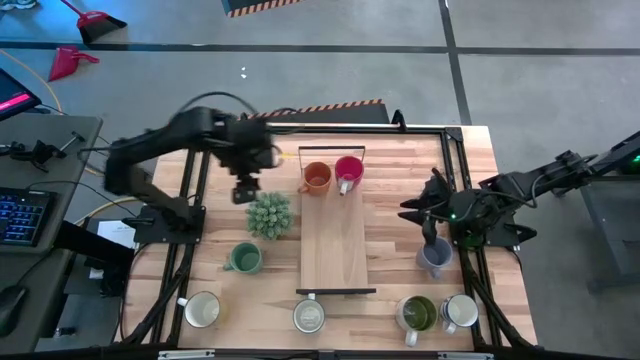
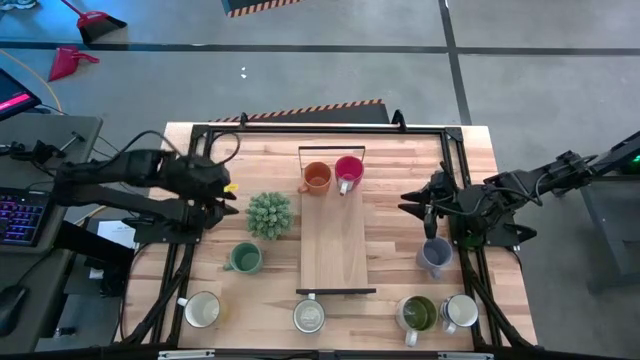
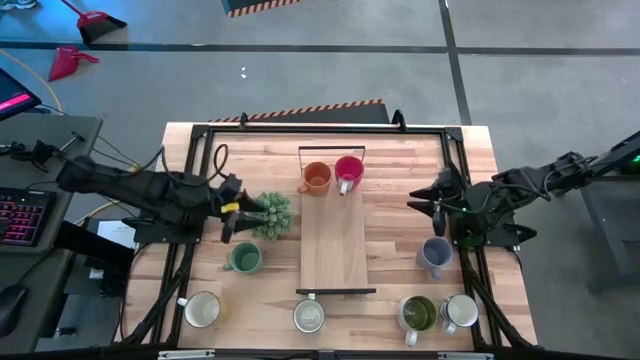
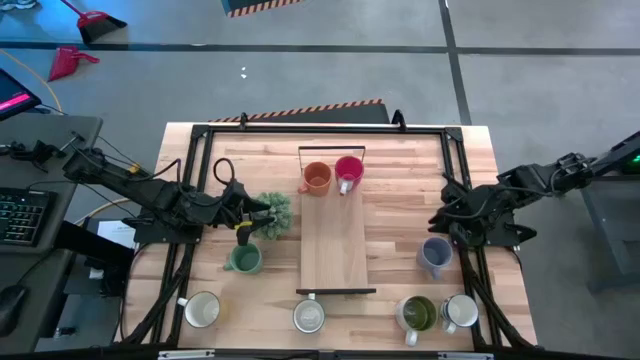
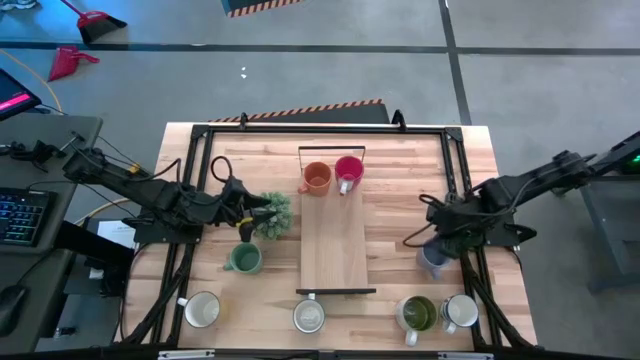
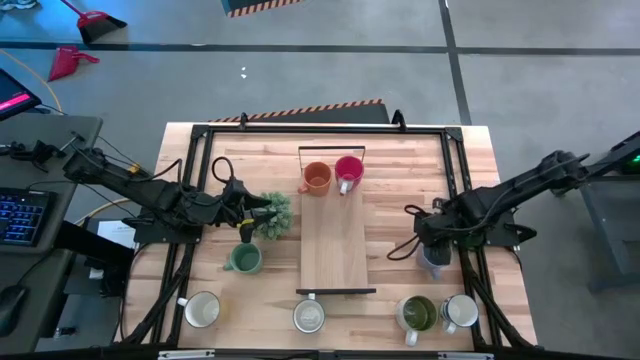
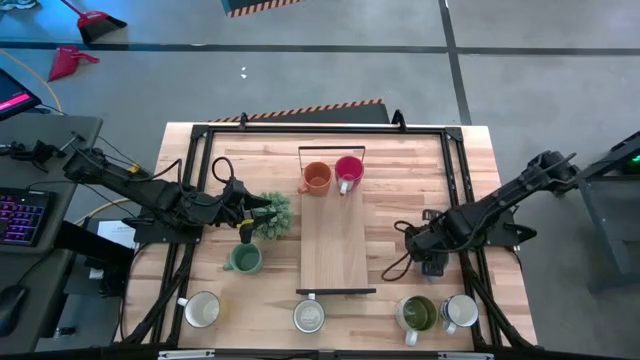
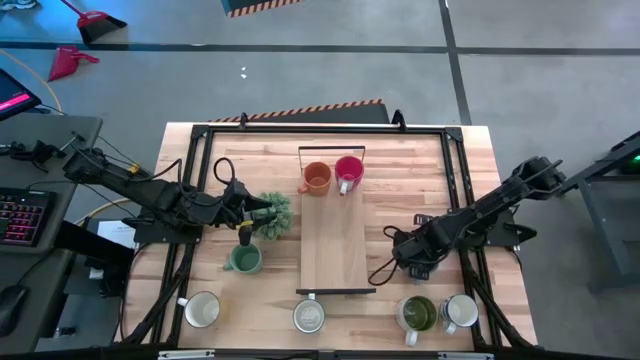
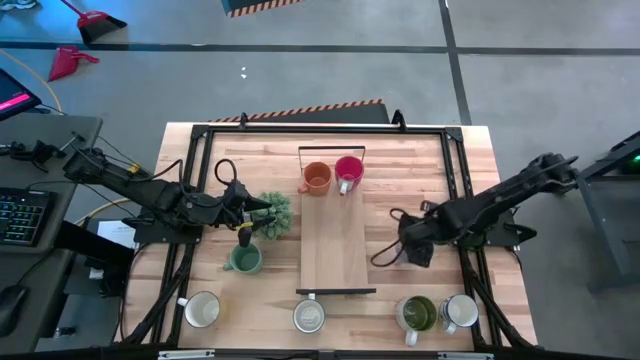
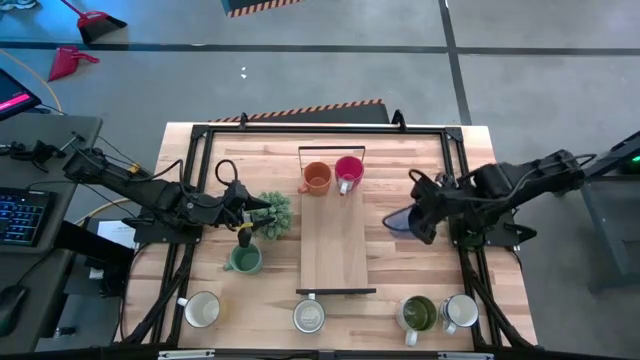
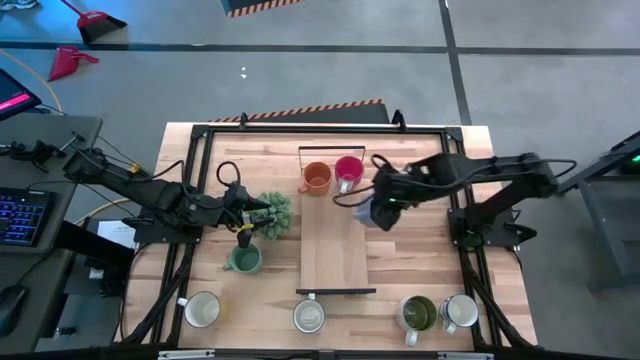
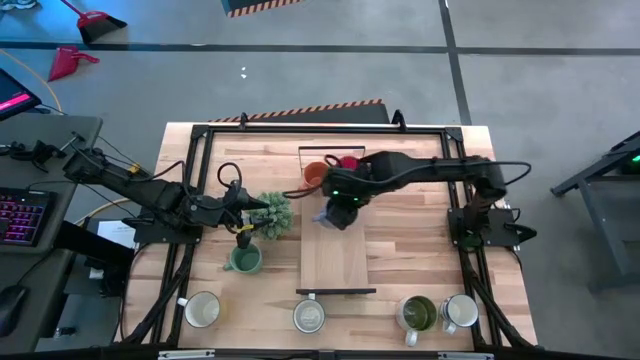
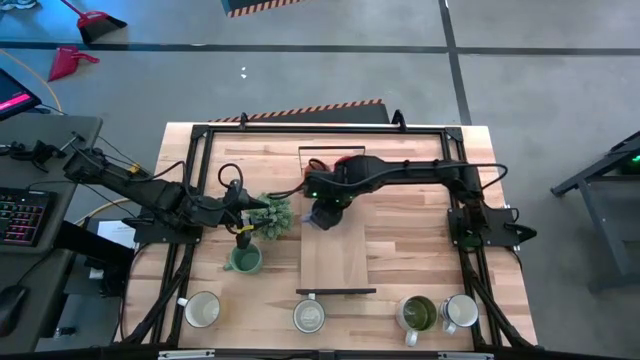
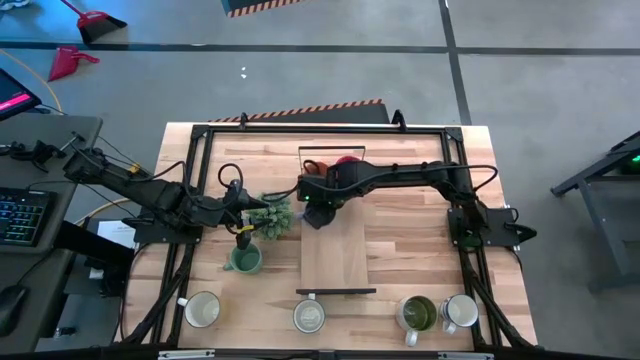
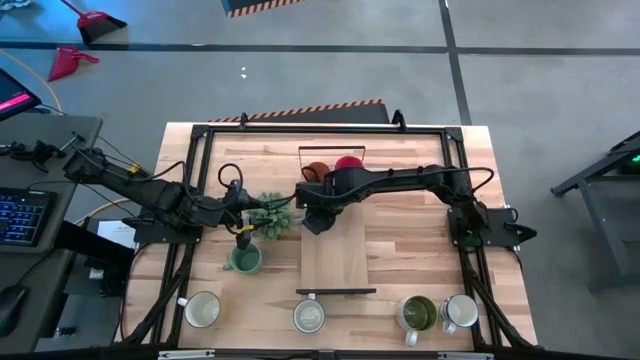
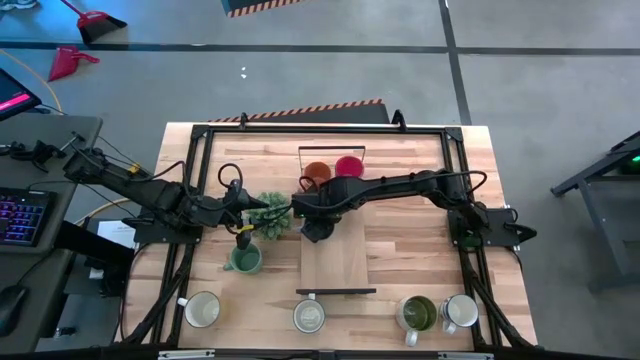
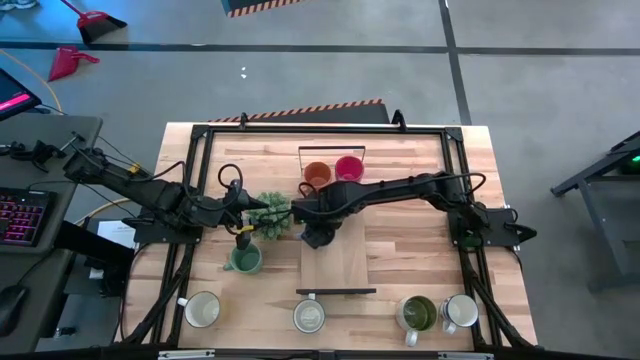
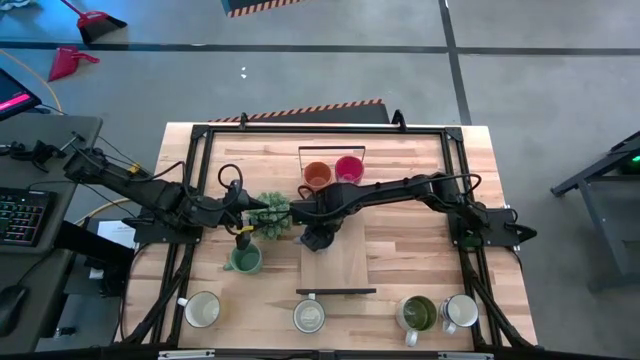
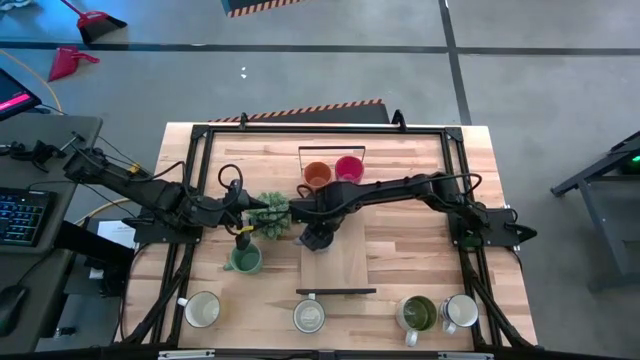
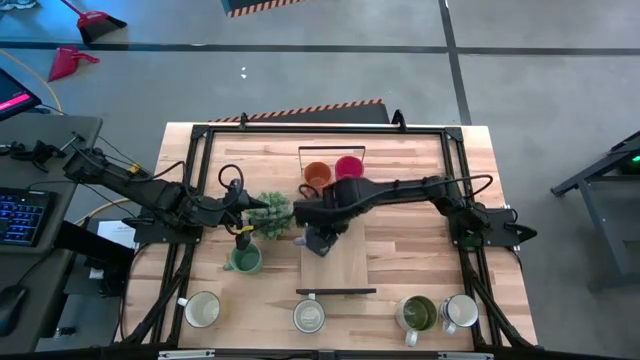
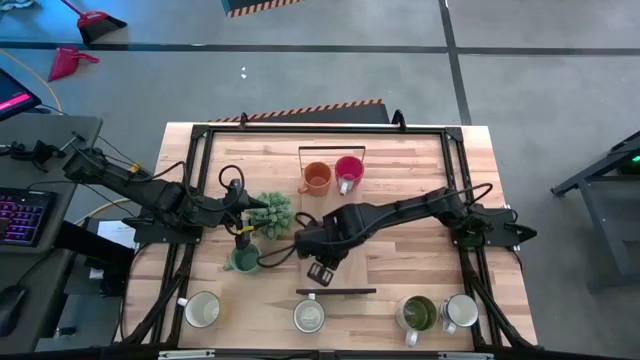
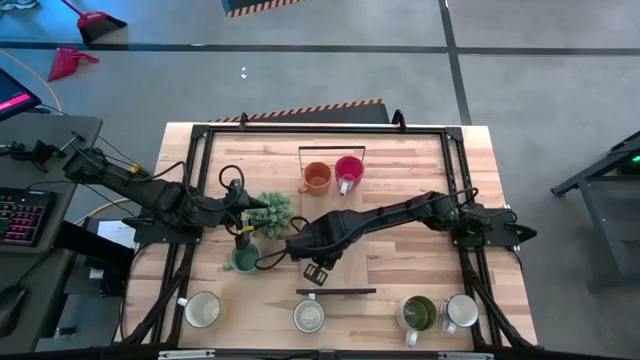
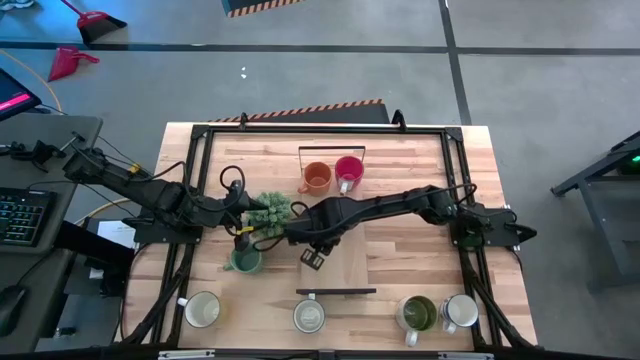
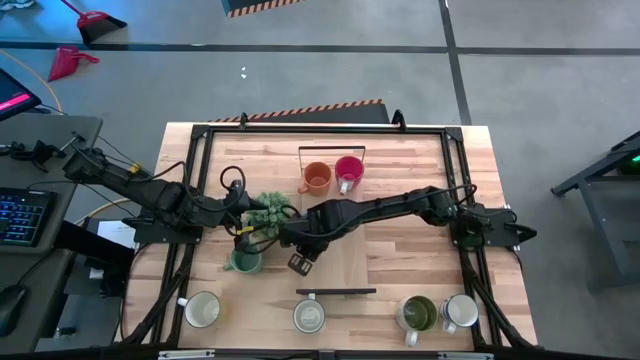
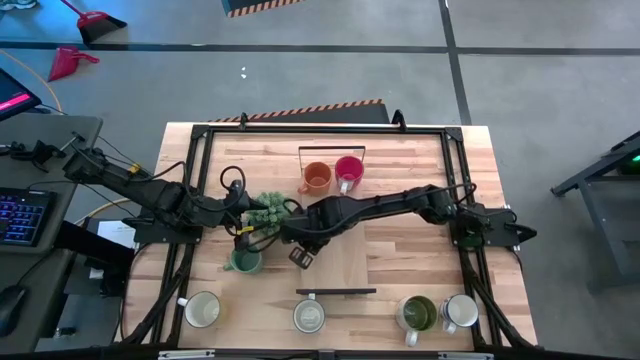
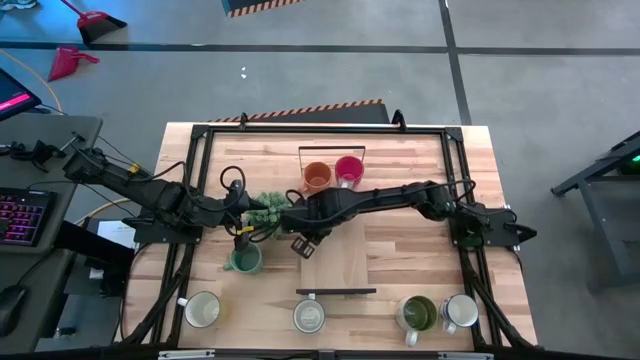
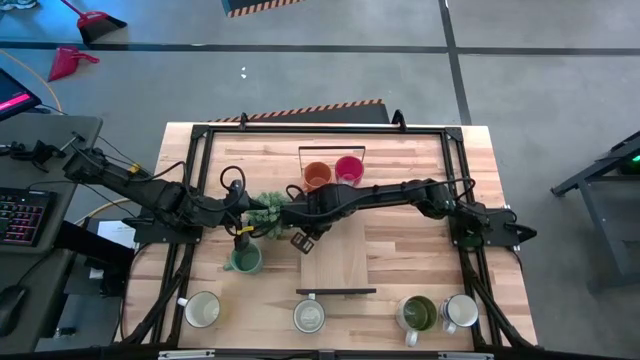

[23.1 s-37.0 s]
Task: Place coffee mugs
Put the purple mug on the shelf

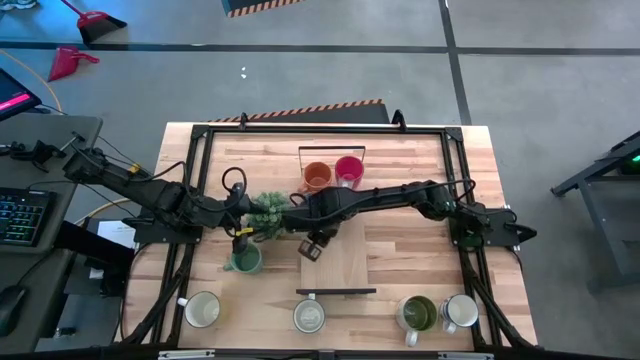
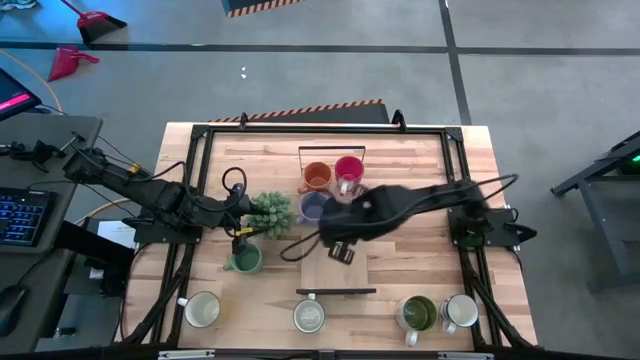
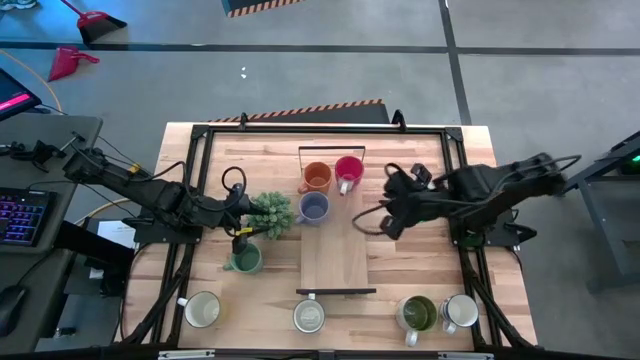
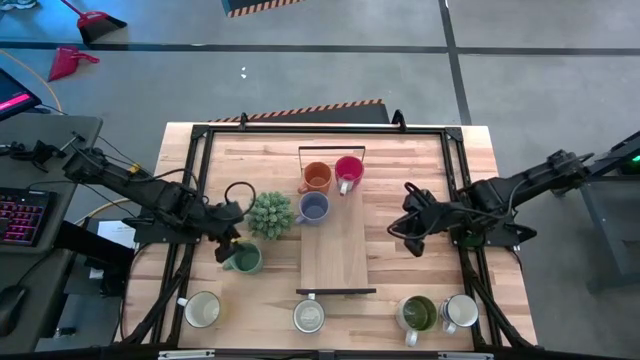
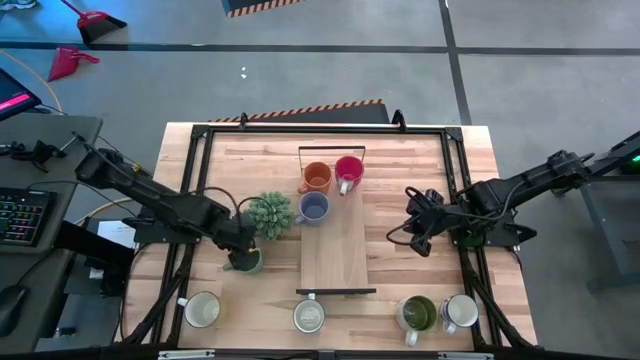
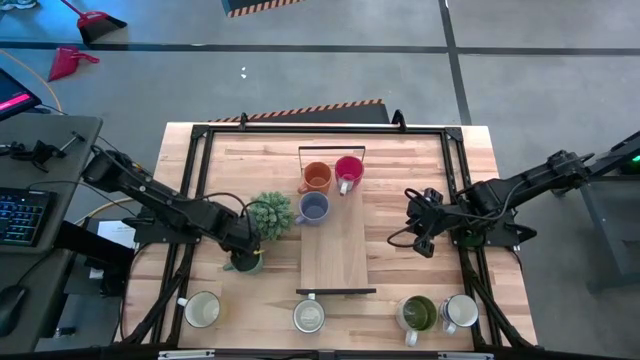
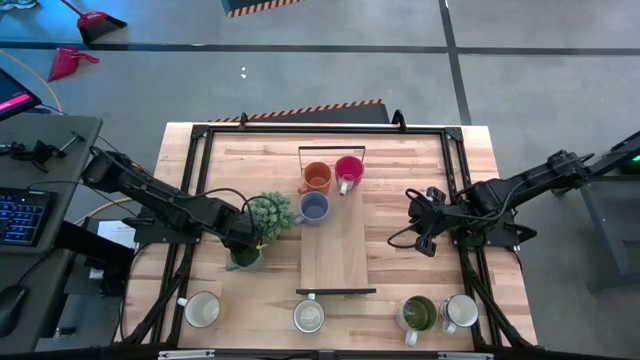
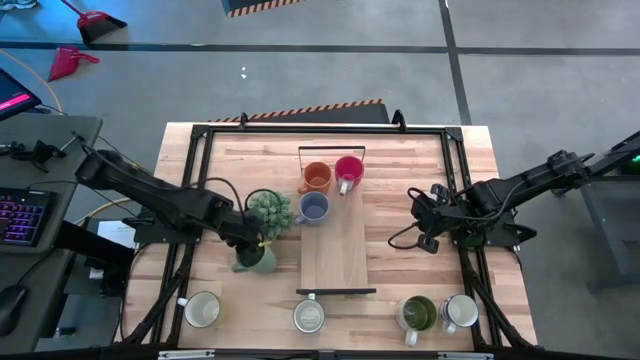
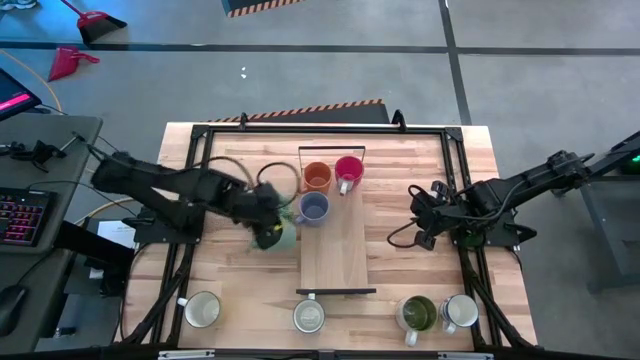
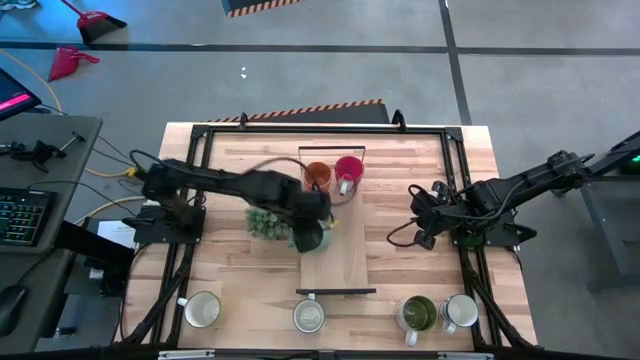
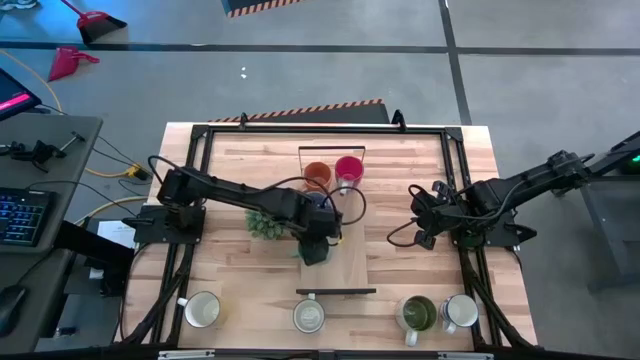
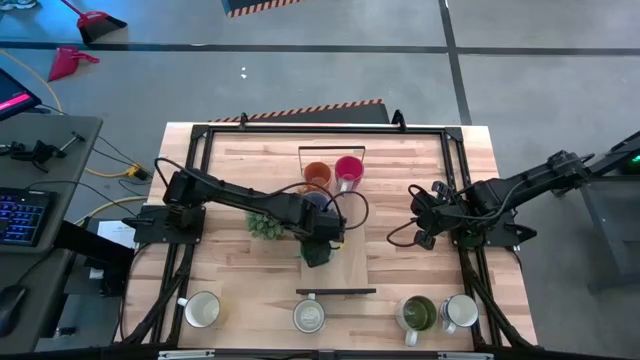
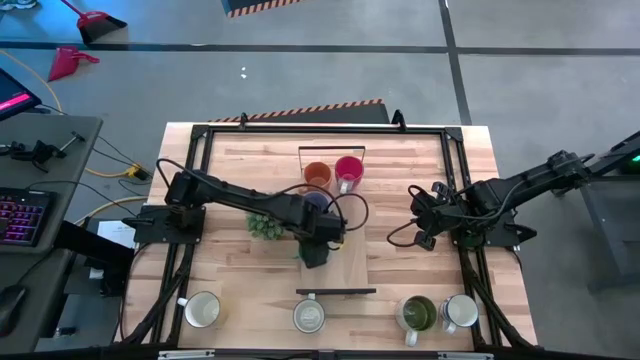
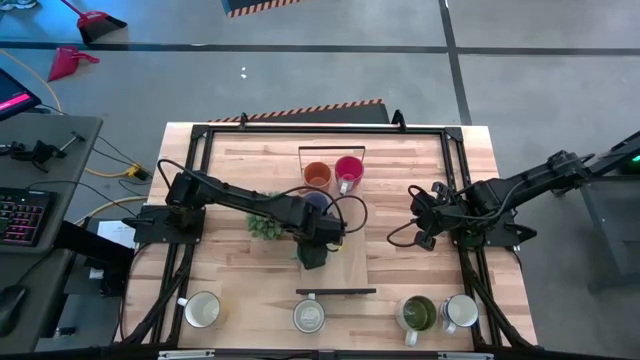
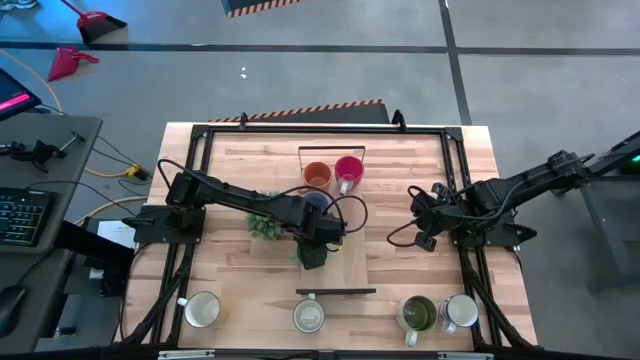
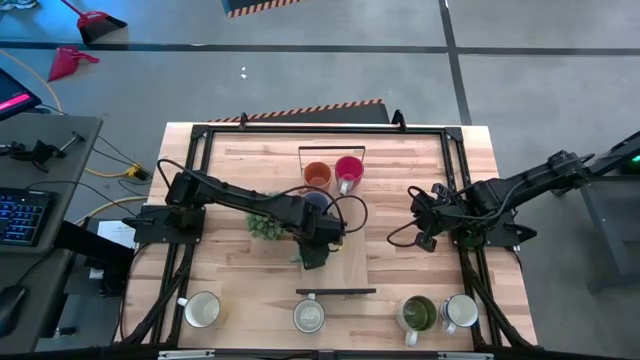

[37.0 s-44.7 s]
Put the light green mug on the shelf
